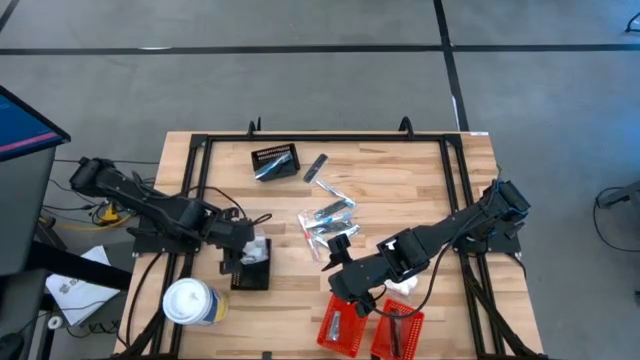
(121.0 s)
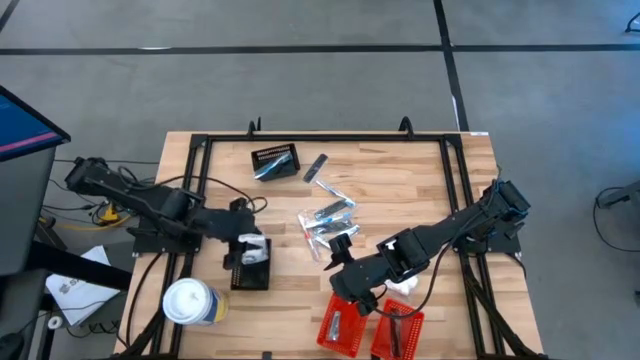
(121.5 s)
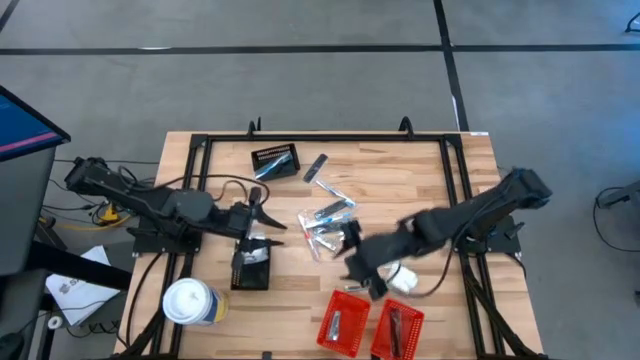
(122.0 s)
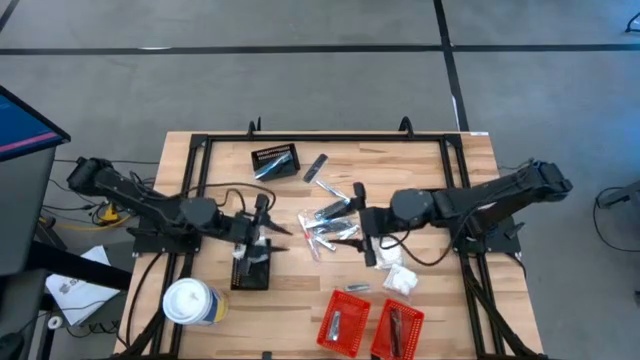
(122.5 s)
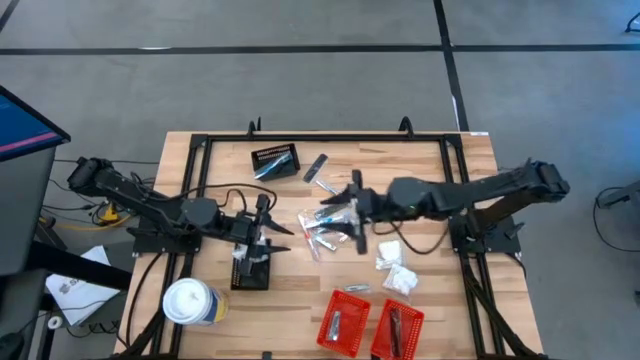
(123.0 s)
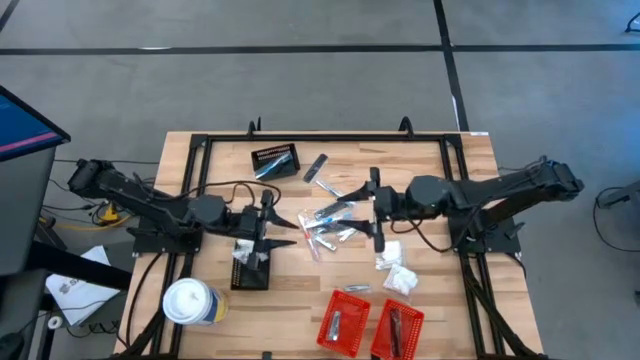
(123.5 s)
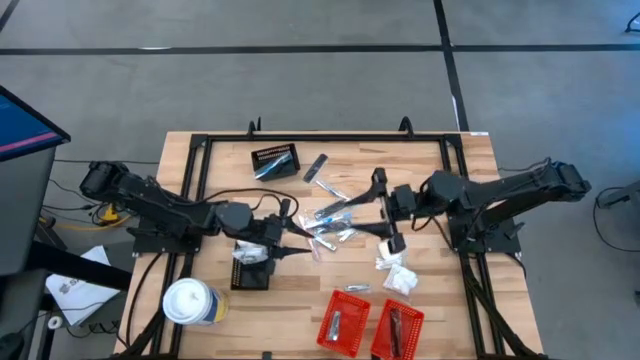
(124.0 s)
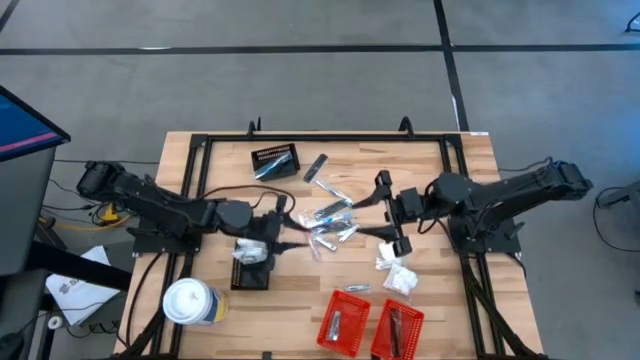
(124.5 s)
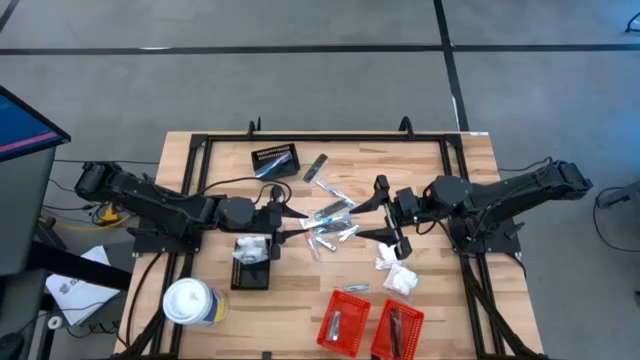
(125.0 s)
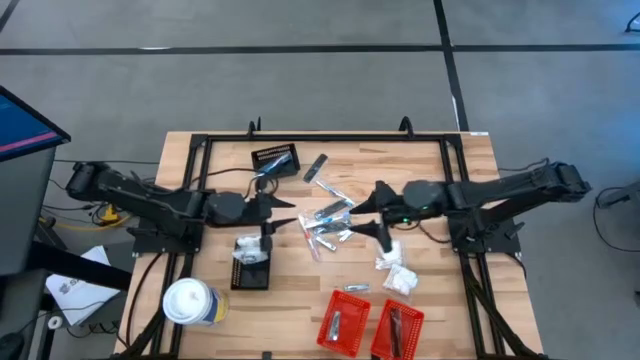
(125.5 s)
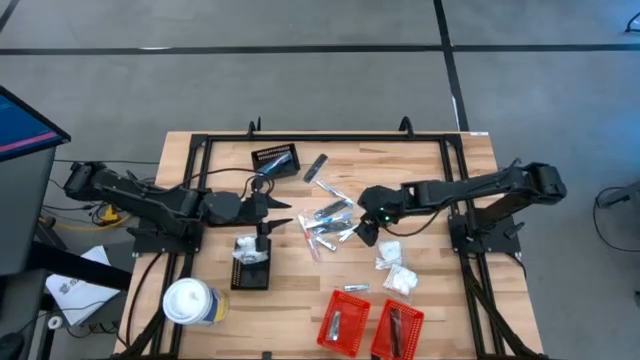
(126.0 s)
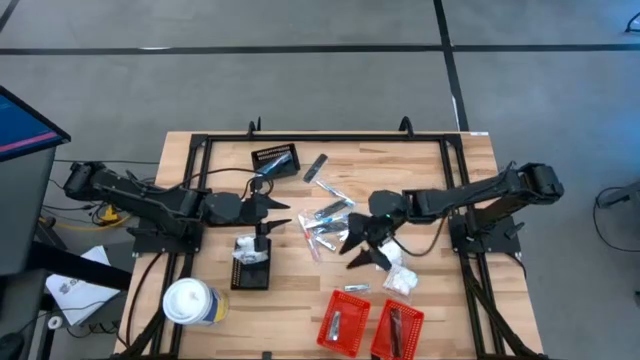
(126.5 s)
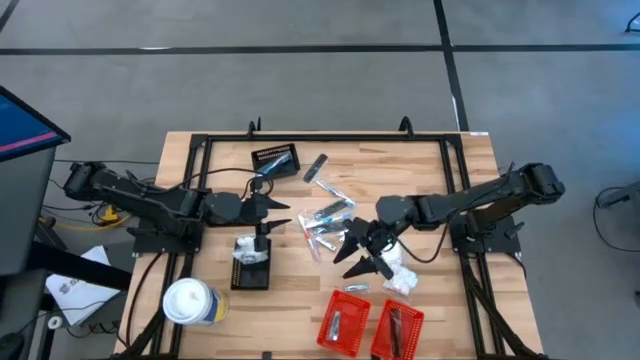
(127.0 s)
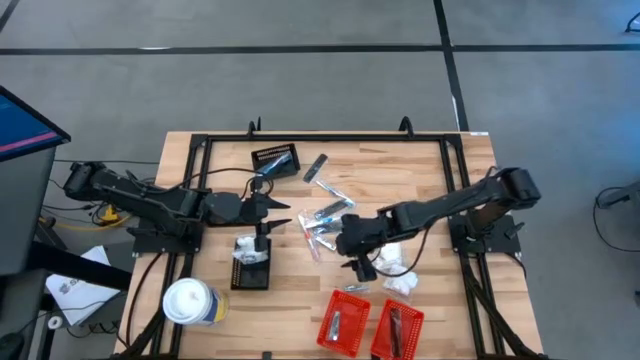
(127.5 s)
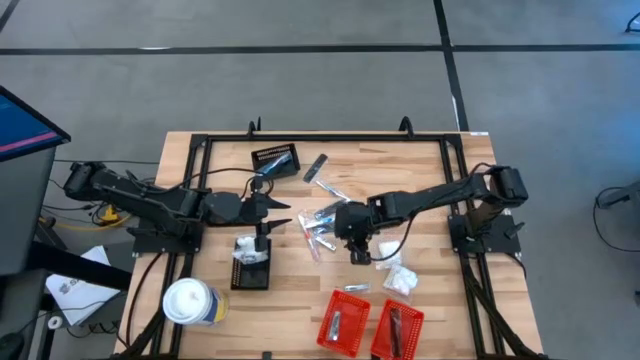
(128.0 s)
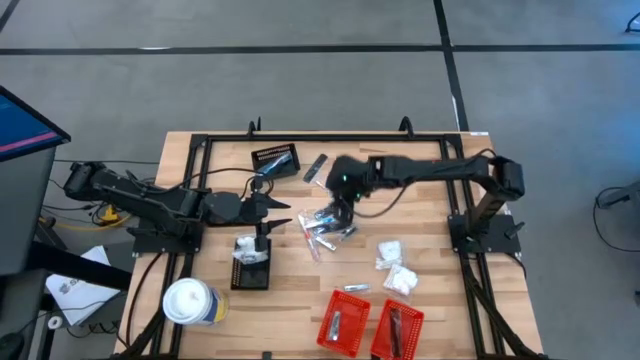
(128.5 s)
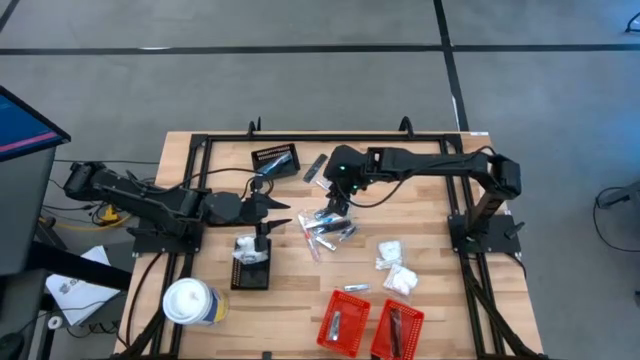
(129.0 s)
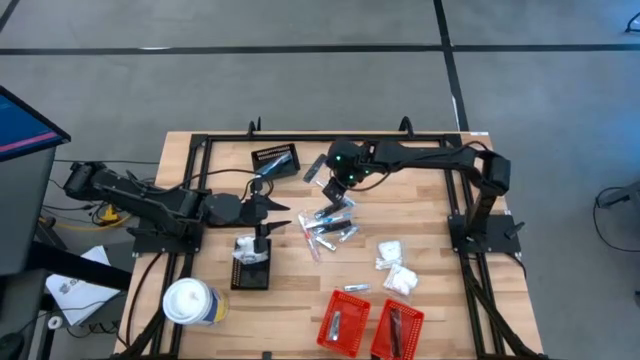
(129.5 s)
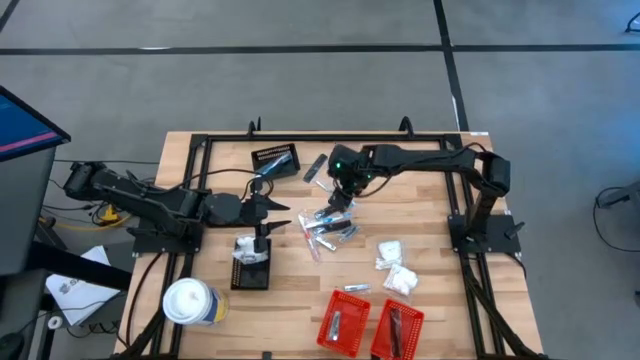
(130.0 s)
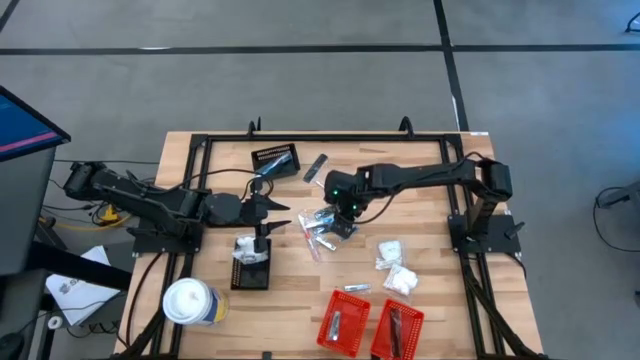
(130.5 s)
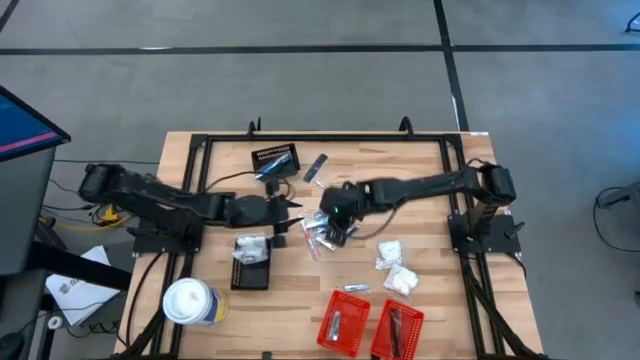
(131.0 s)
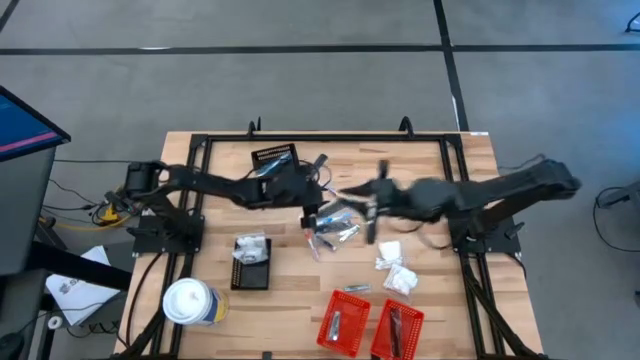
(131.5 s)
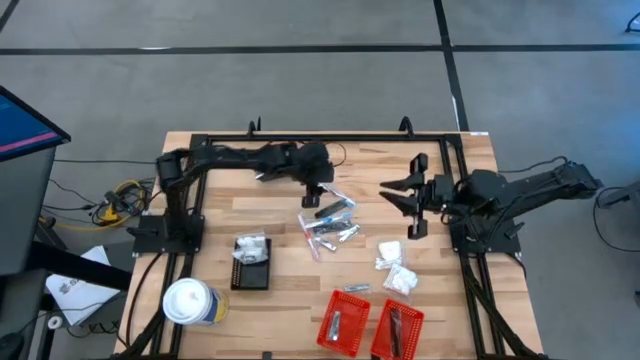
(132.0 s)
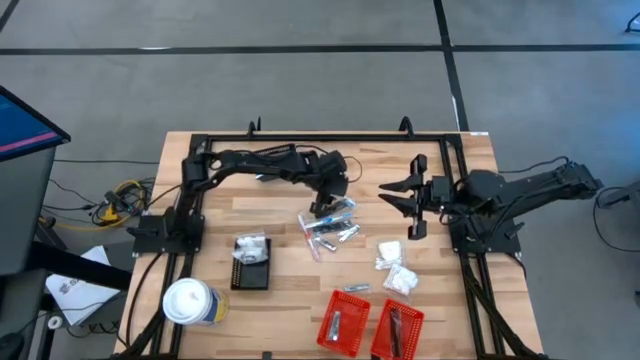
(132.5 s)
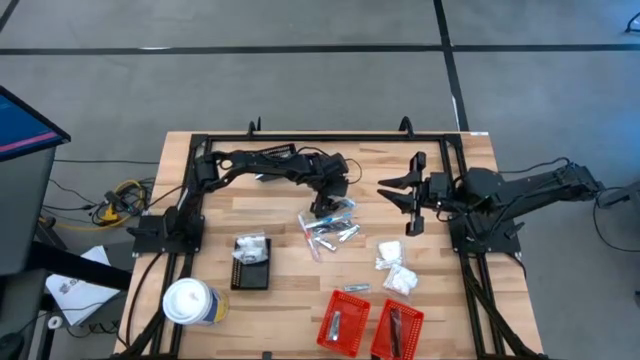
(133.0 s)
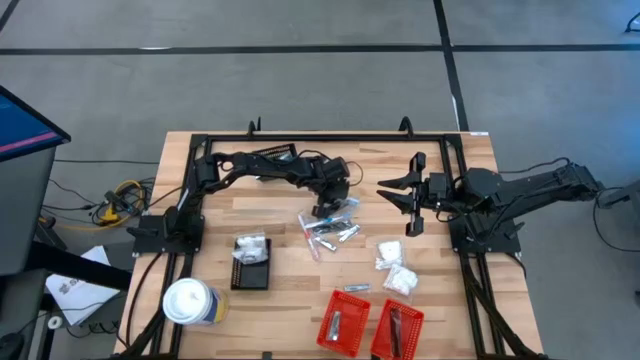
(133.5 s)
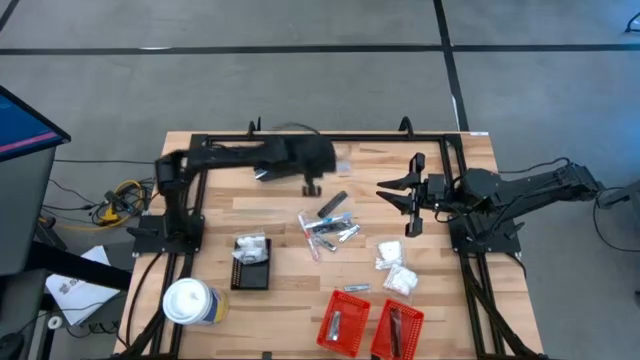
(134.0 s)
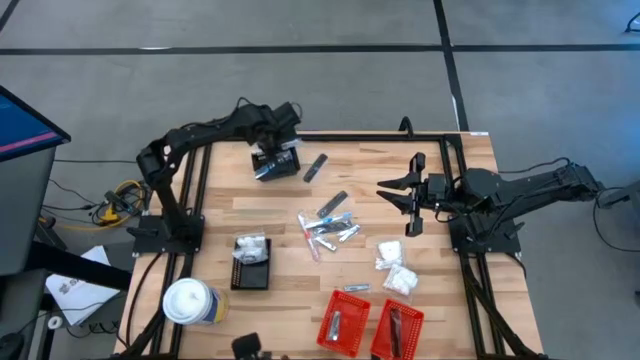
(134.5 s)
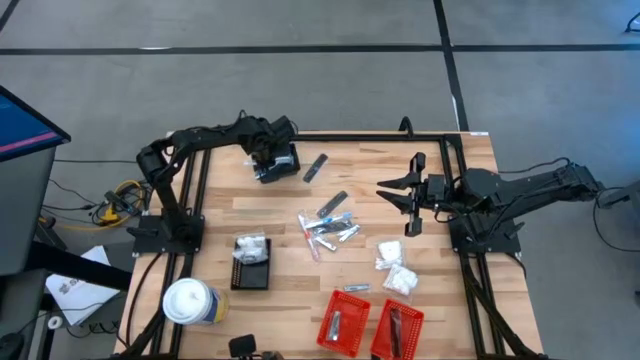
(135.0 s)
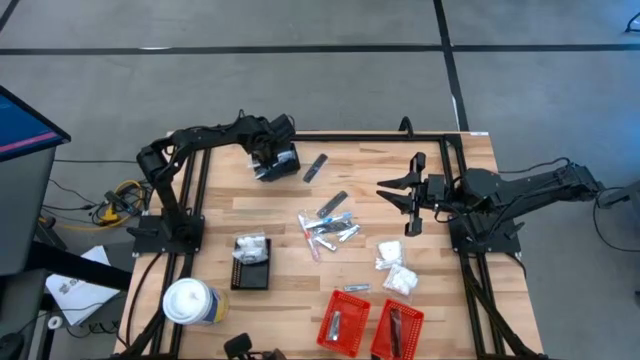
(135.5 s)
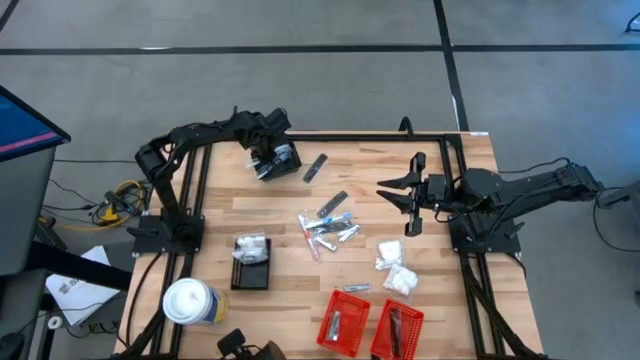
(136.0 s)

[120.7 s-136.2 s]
Task: Pick & Place Travel size toiletries
Put the blue toothbrush into the top black bin

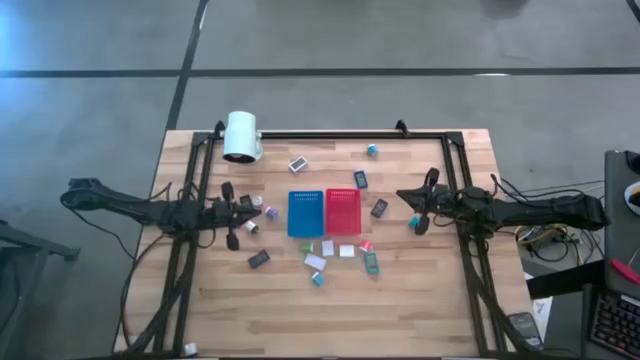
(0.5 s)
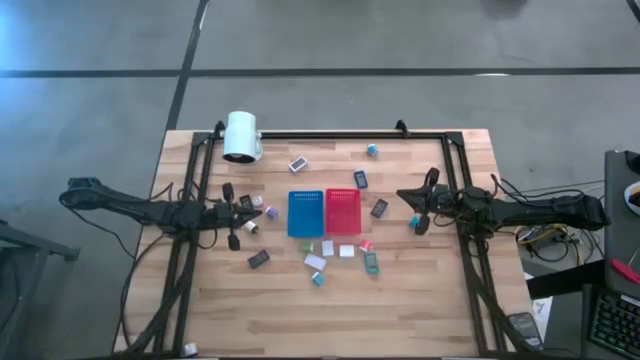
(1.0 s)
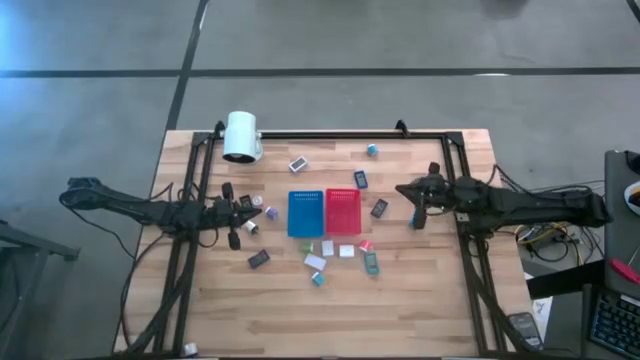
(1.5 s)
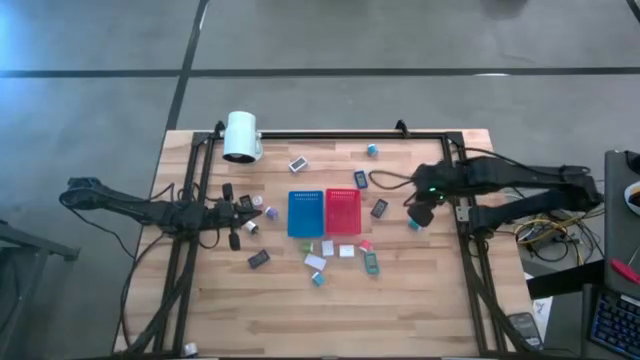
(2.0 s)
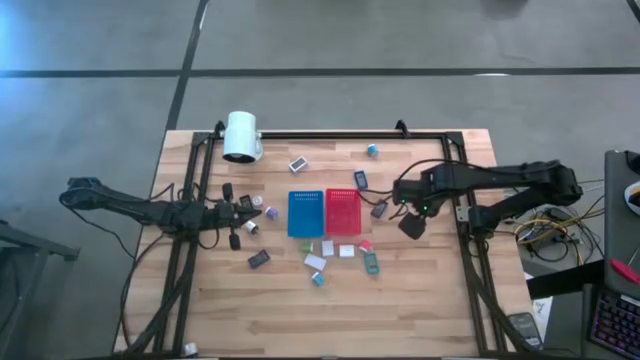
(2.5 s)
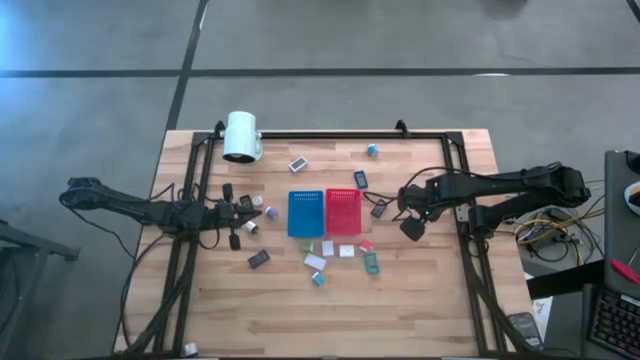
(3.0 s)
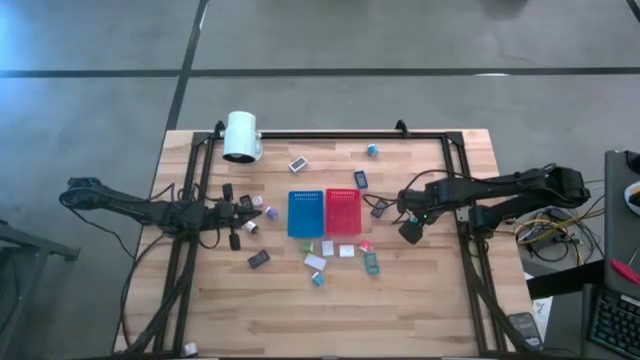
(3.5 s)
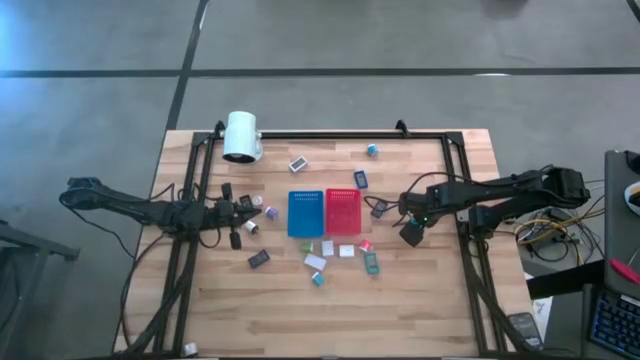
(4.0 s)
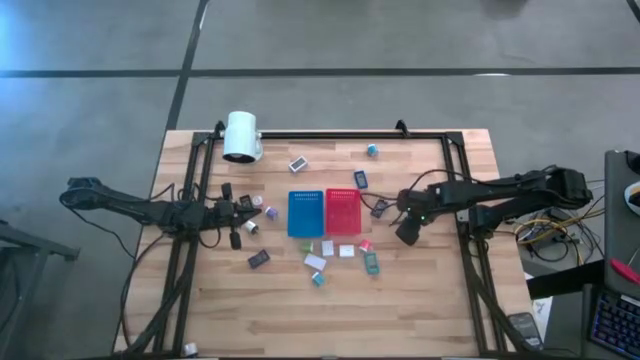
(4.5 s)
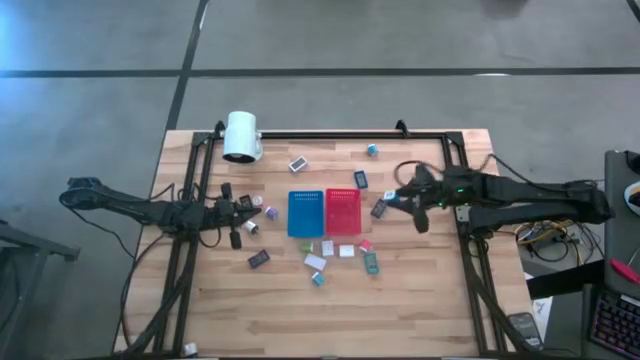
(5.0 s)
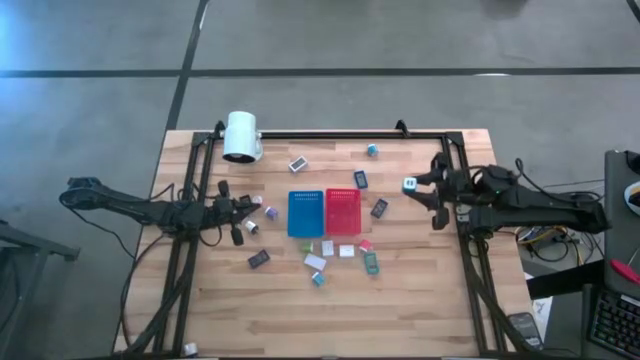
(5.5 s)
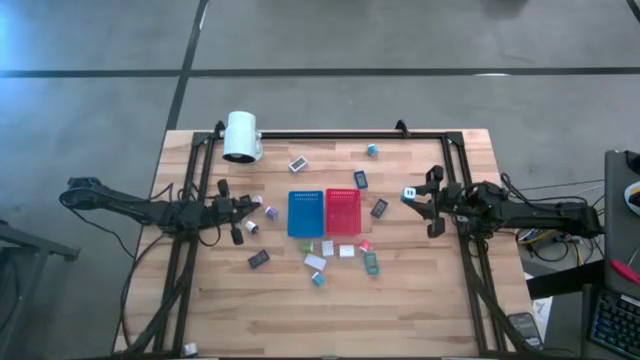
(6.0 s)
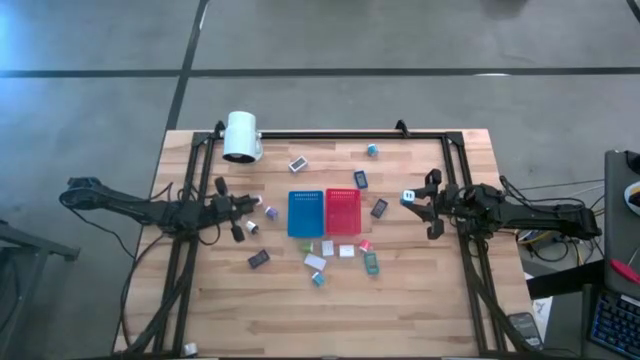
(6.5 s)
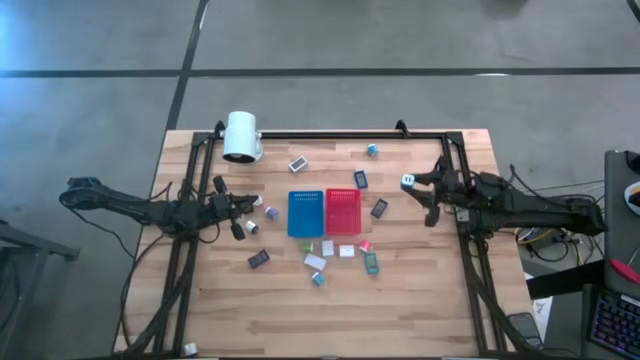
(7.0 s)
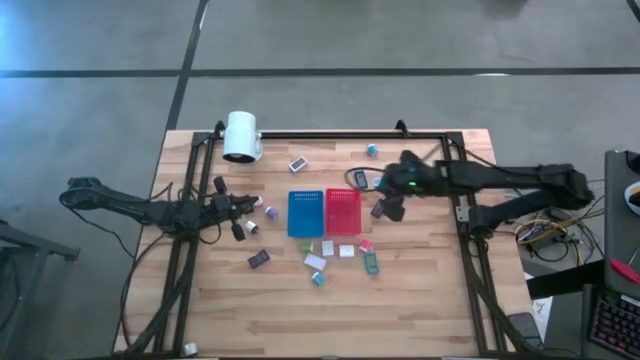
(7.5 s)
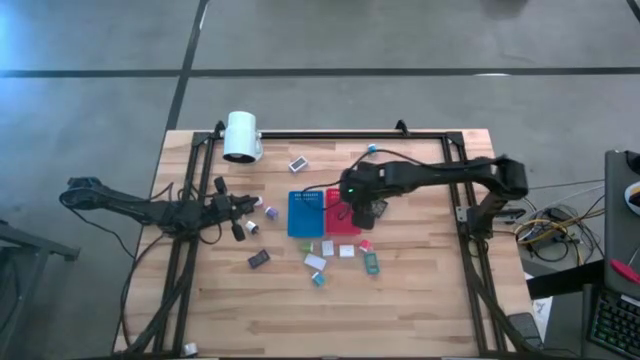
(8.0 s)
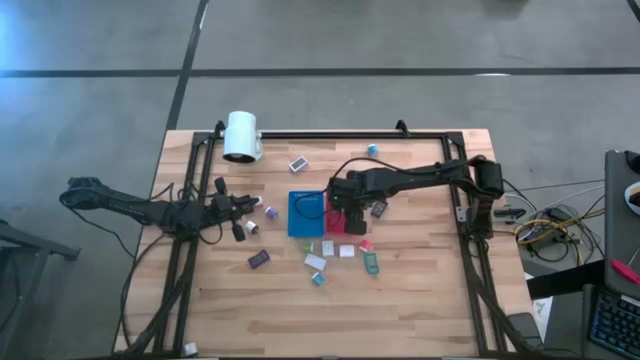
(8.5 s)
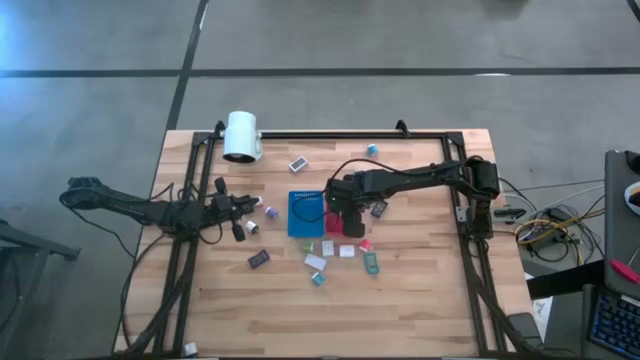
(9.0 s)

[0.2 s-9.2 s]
Task: Pick & Place Office items
Put the blue charger adapter into the red bin
